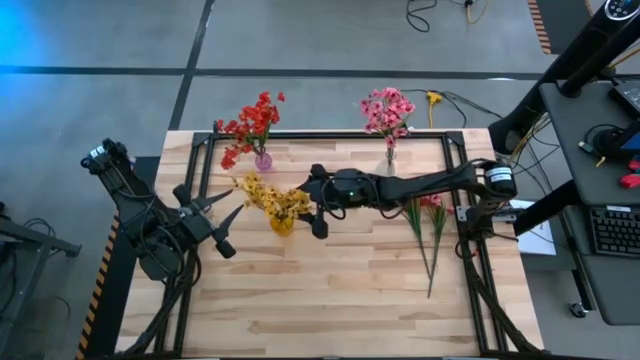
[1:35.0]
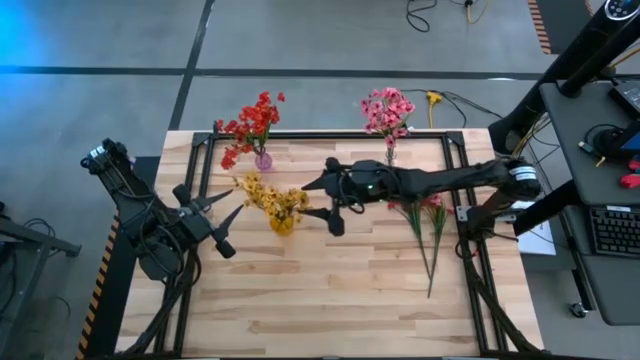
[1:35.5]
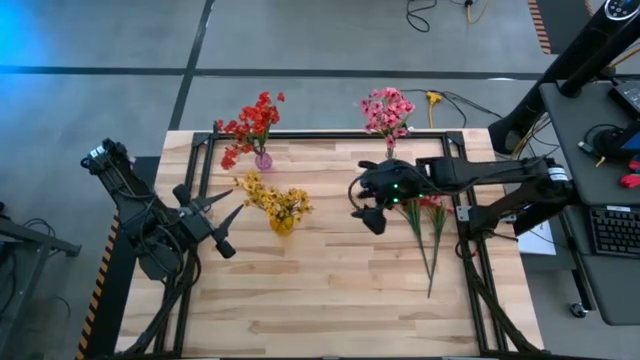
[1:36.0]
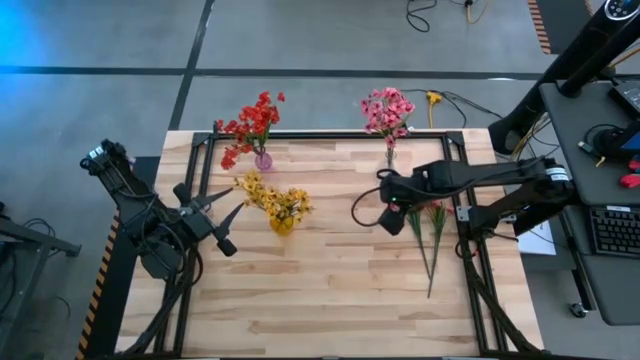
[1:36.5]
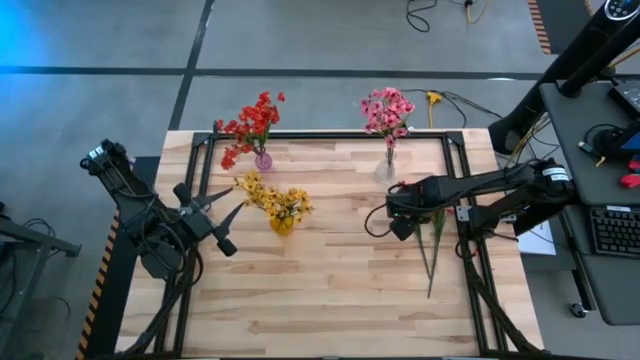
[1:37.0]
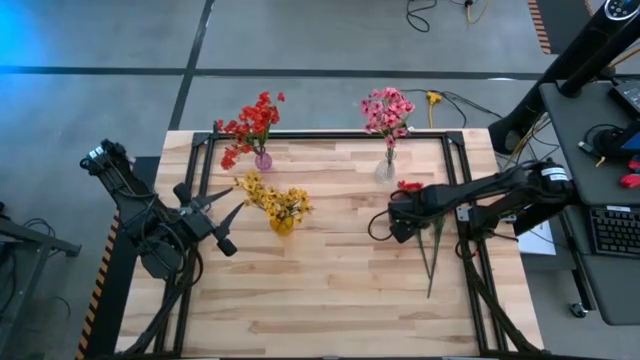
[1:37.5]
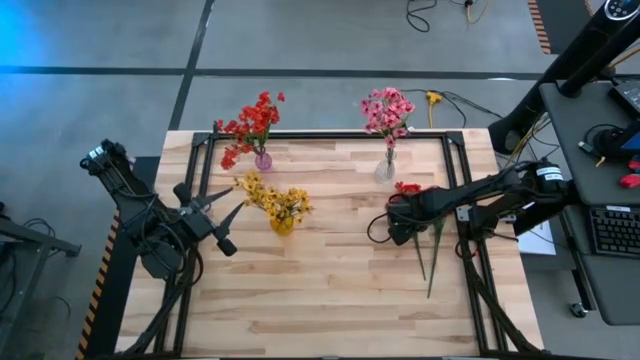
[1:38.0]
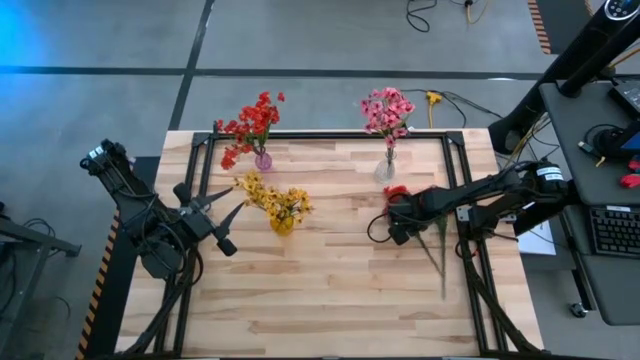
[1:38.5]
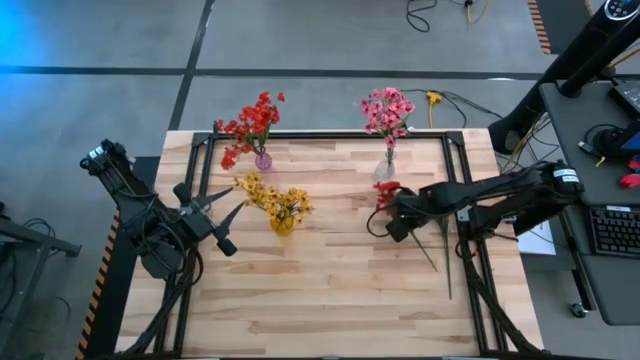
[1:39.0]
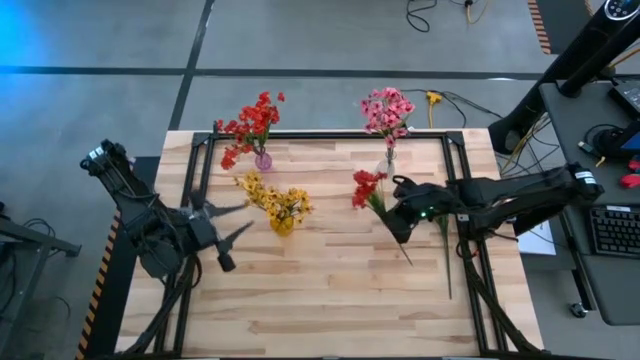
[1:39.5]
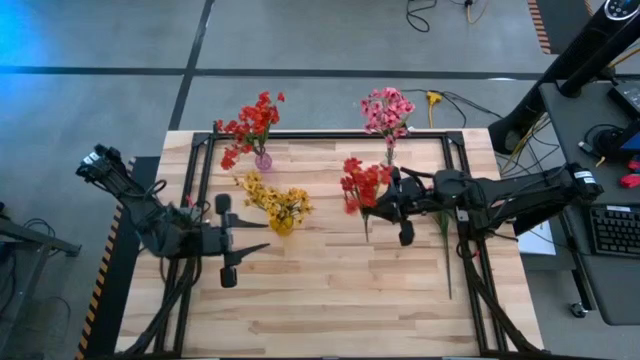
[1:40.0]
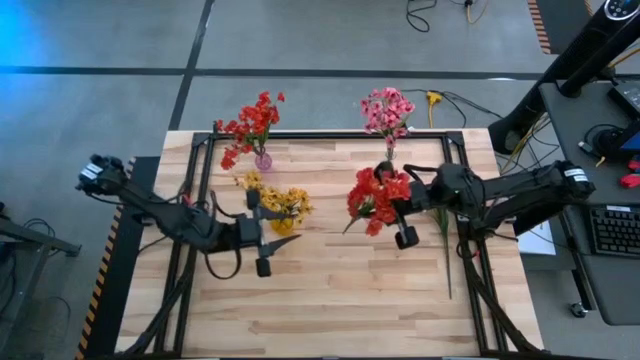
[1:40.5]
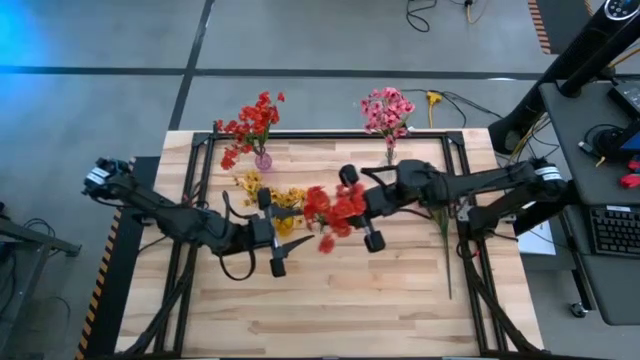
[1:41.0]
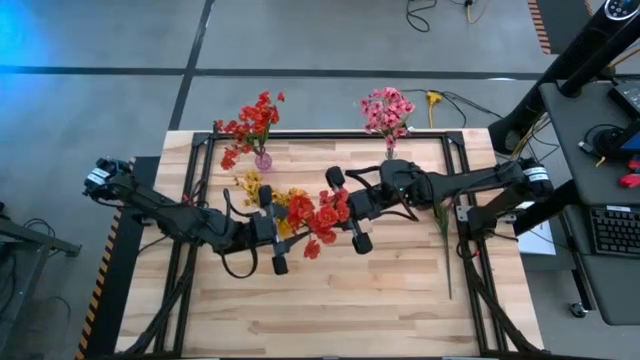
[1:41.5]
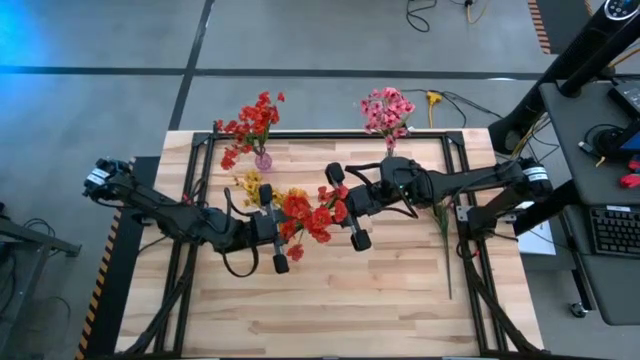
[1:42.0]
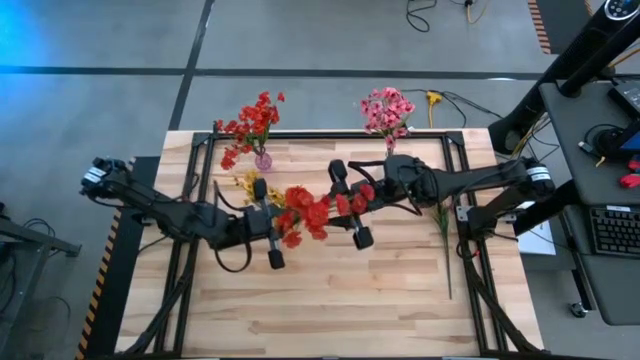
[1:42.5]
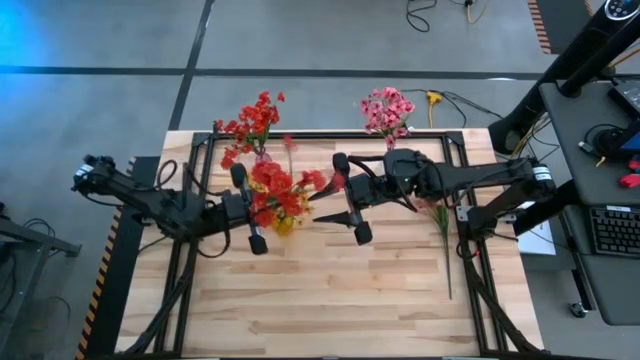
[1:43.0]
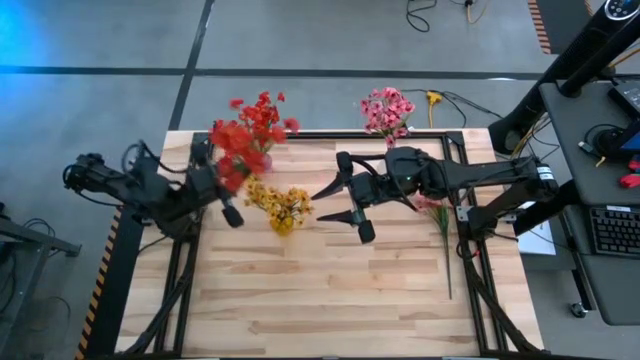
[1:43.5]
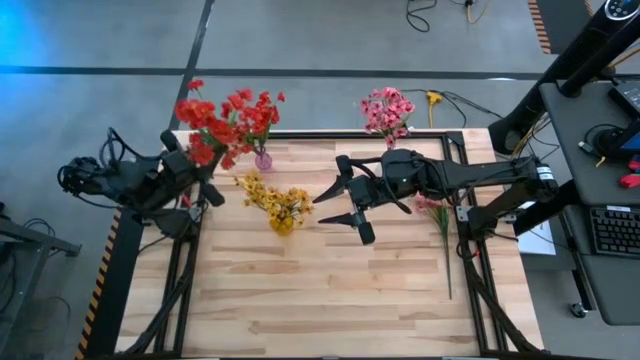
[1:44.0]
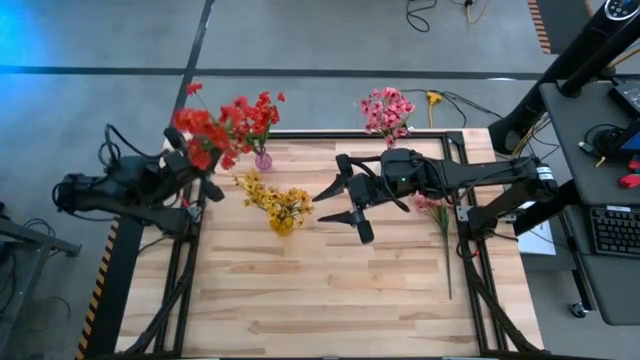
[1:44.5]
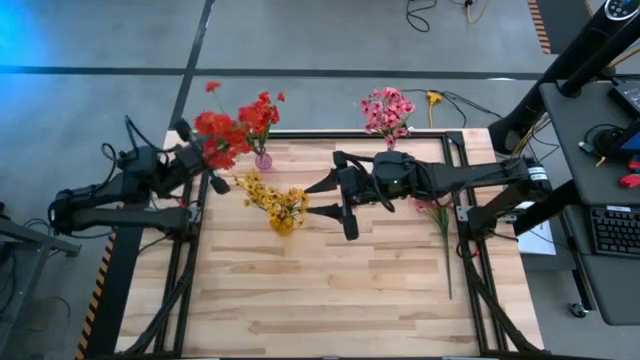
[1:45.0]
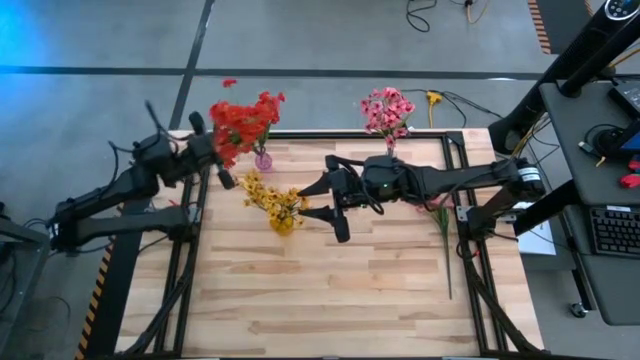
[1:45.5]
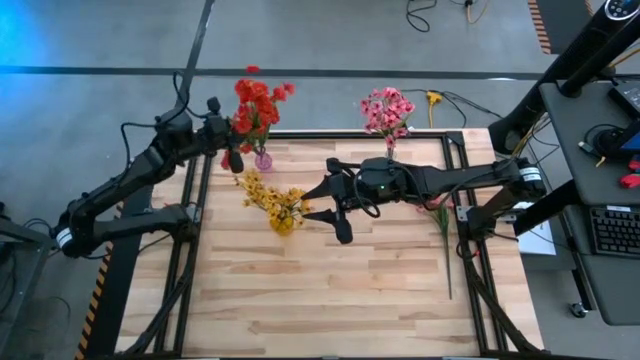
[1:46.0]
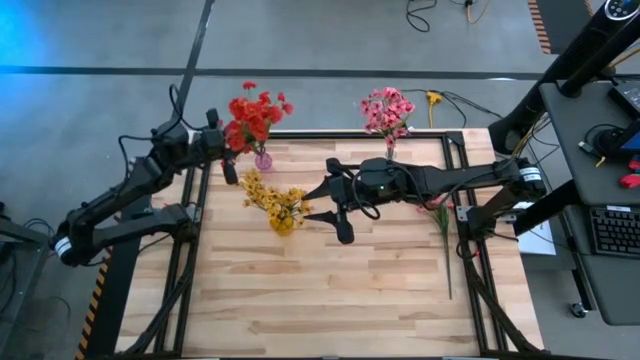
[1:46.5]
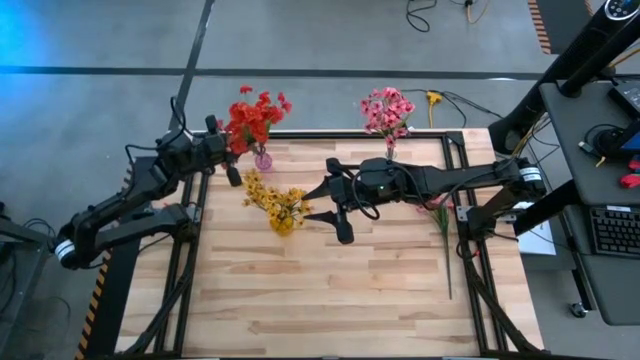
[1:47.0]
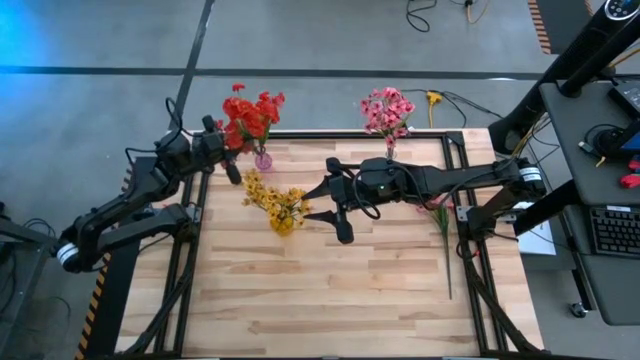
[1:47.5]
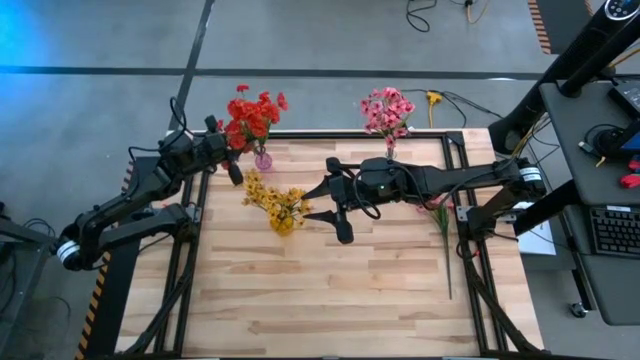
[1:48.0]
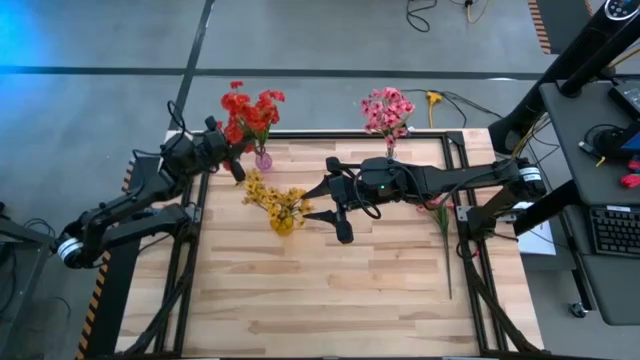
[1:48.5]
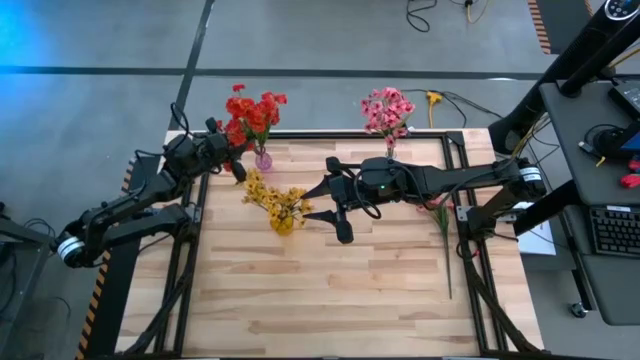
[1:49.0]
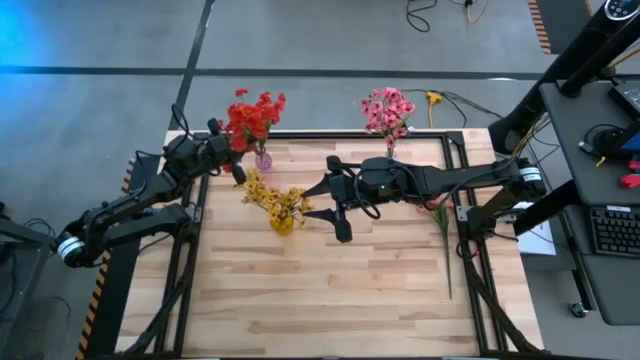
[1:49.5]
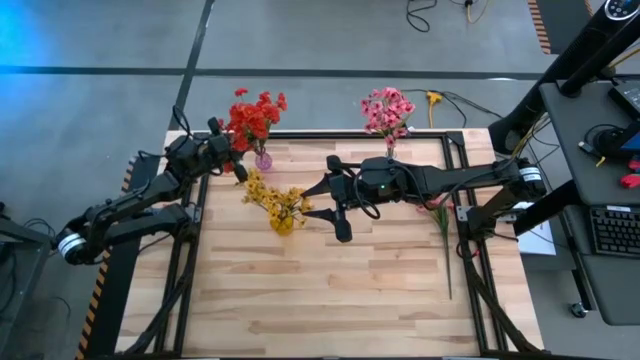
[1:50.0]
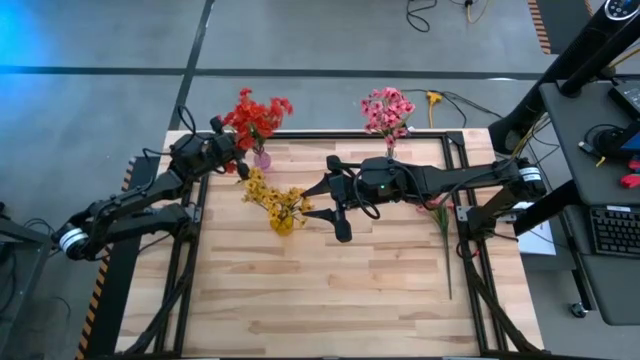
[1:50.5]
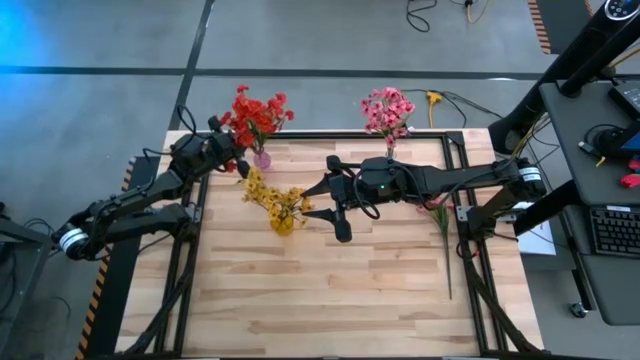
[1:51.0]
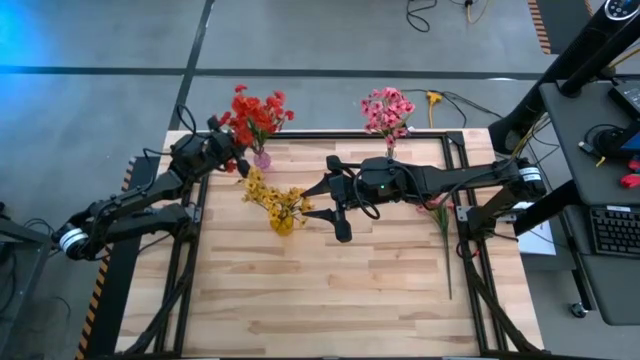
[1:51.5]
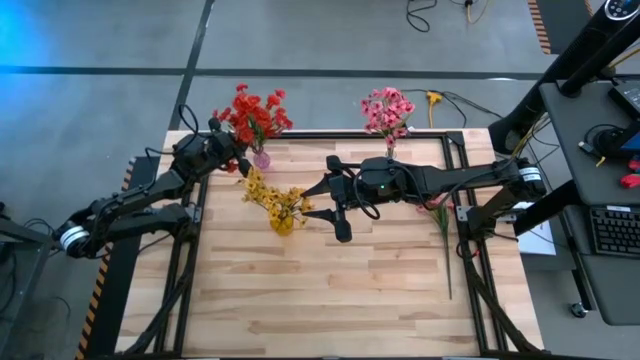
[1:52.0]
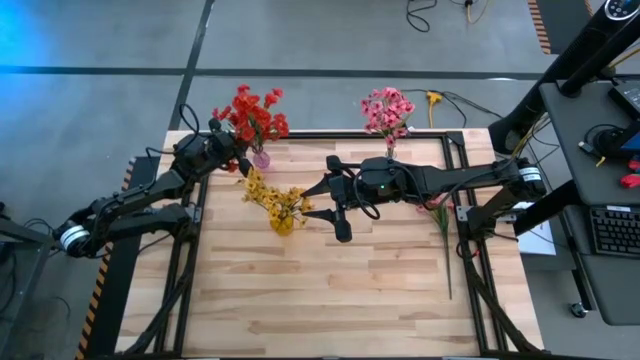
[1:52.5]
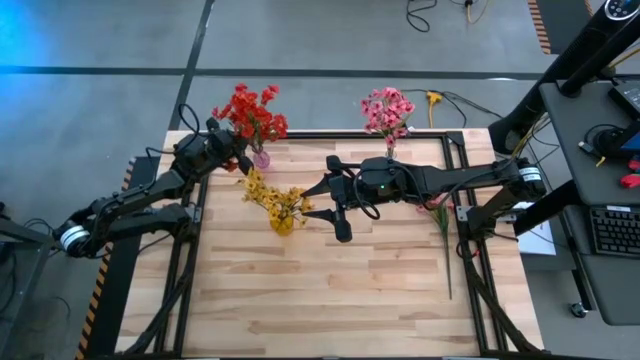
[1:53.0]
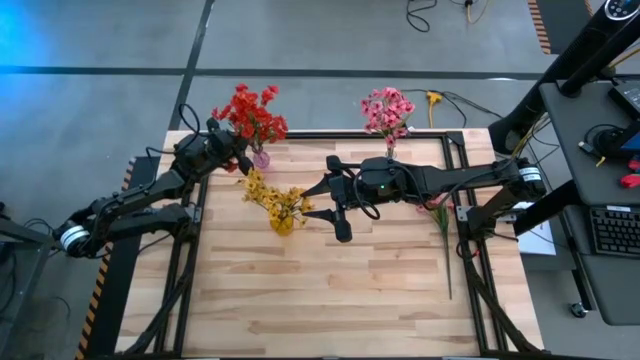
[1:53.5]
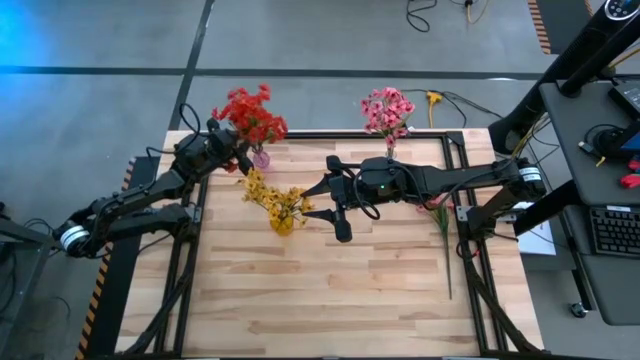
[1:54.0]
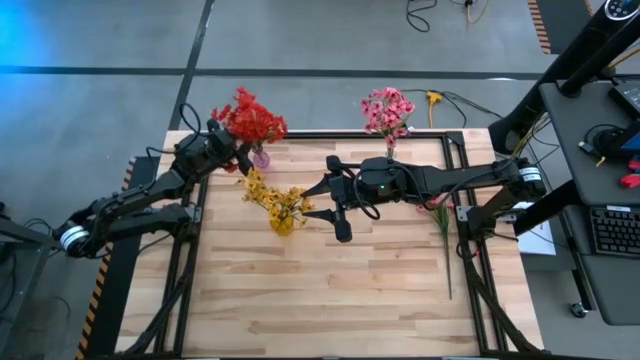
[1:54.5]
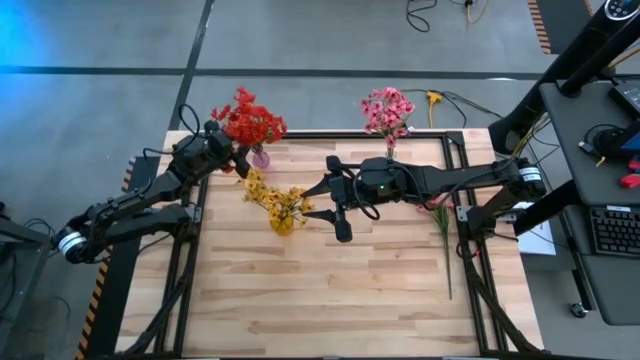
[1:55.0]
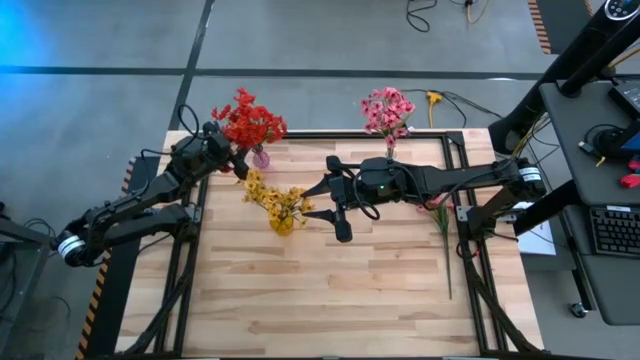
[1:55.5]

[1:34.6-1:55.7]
Task: Sort flowers into vase by color
Put the red flower into the purple flower vase
